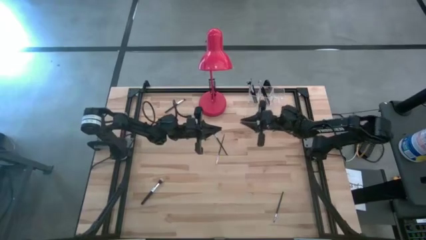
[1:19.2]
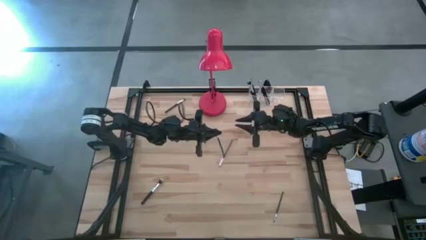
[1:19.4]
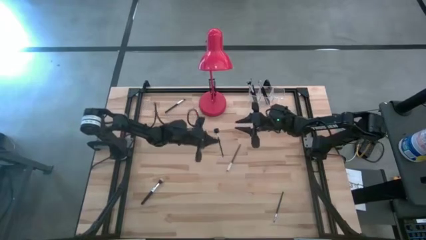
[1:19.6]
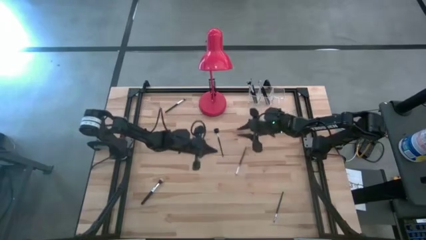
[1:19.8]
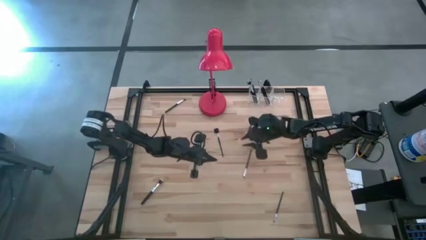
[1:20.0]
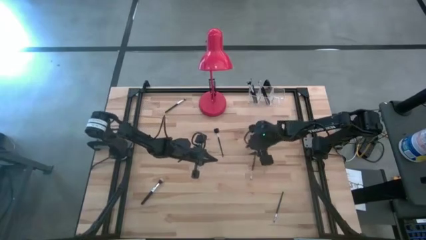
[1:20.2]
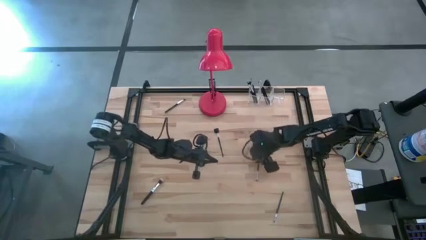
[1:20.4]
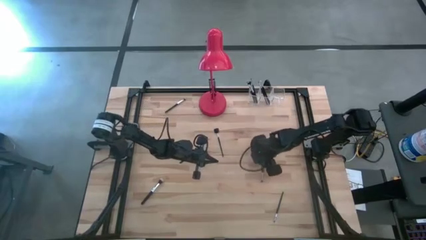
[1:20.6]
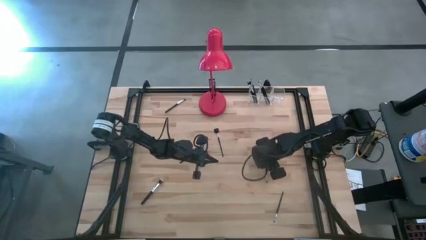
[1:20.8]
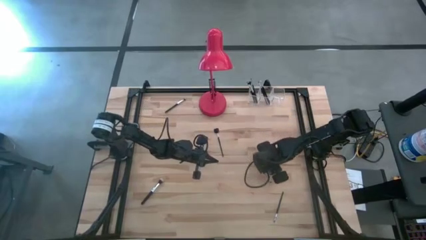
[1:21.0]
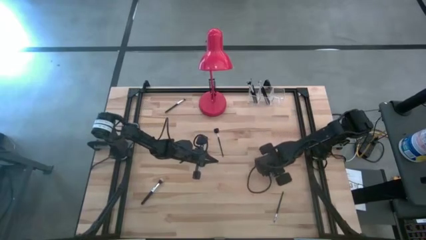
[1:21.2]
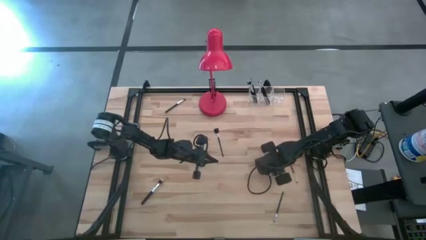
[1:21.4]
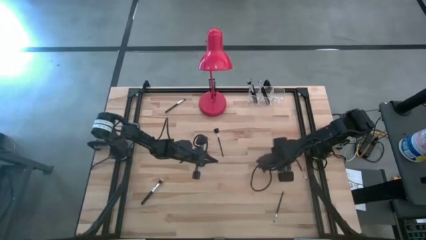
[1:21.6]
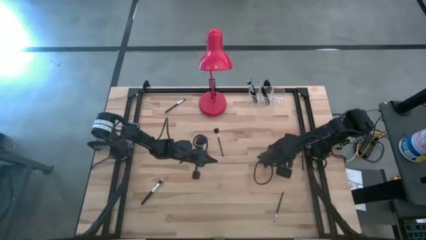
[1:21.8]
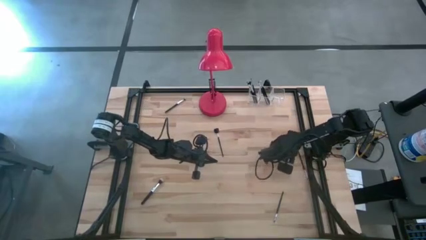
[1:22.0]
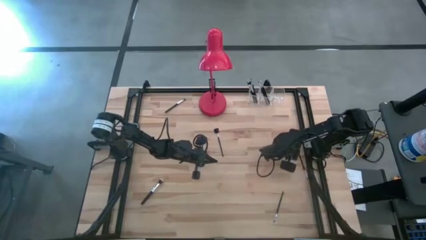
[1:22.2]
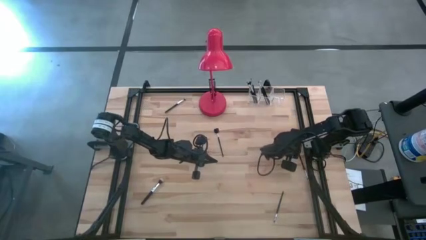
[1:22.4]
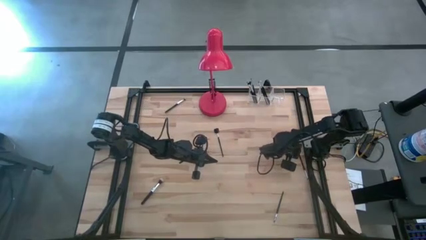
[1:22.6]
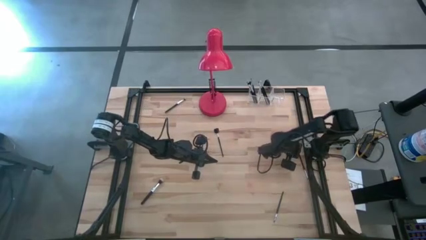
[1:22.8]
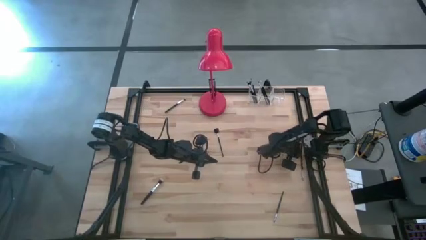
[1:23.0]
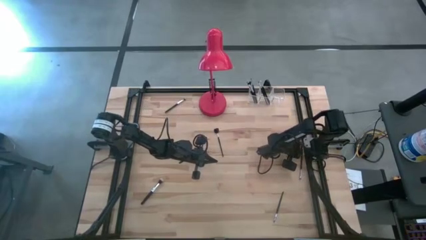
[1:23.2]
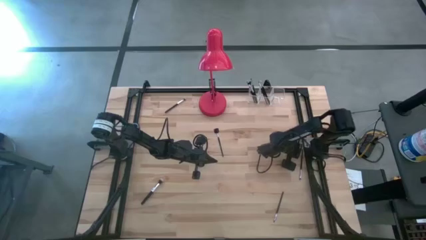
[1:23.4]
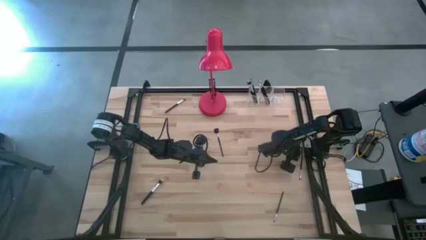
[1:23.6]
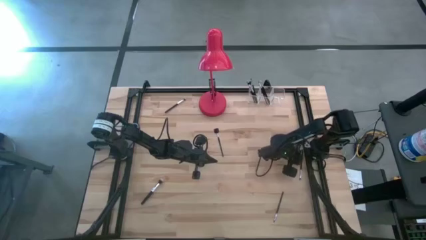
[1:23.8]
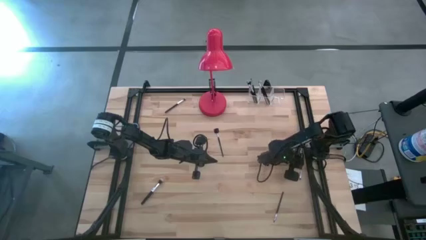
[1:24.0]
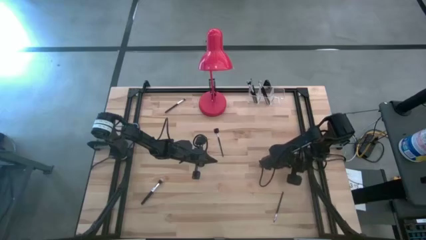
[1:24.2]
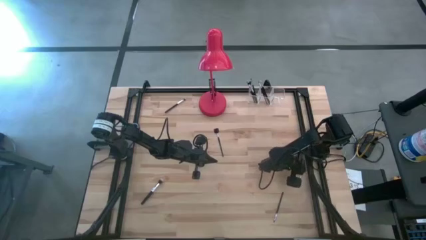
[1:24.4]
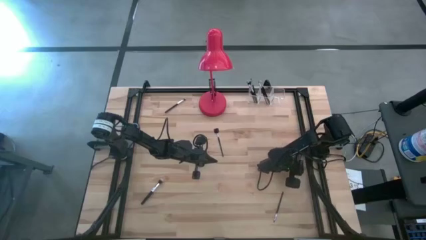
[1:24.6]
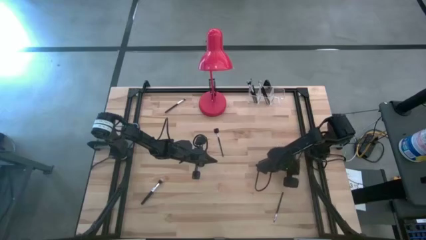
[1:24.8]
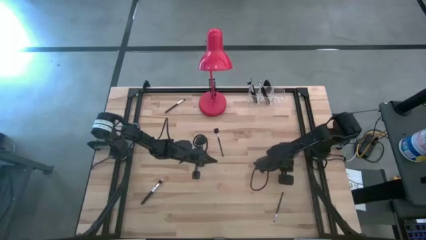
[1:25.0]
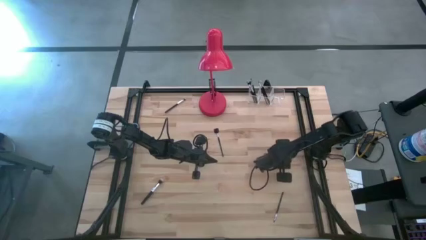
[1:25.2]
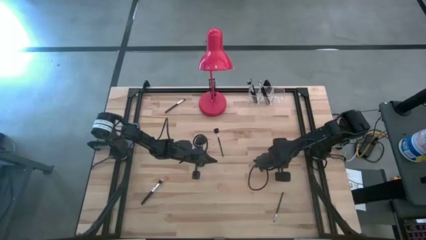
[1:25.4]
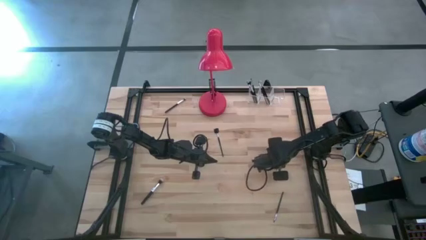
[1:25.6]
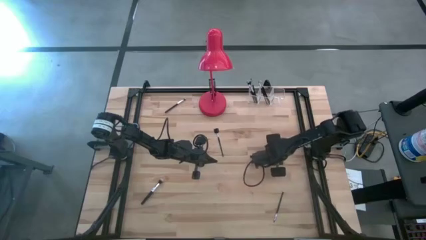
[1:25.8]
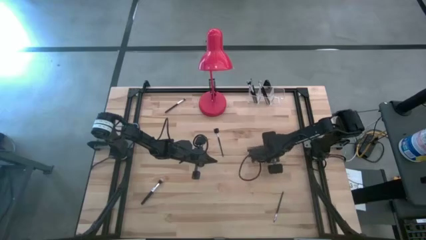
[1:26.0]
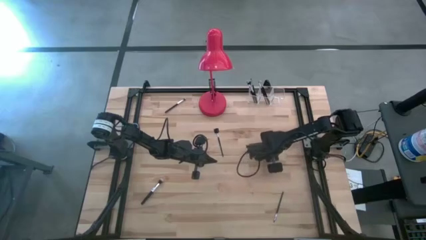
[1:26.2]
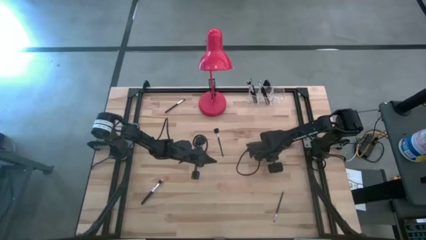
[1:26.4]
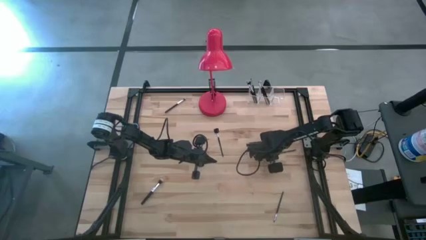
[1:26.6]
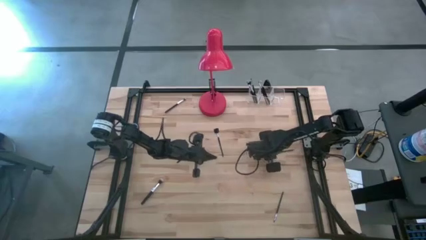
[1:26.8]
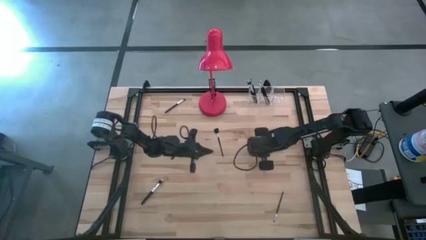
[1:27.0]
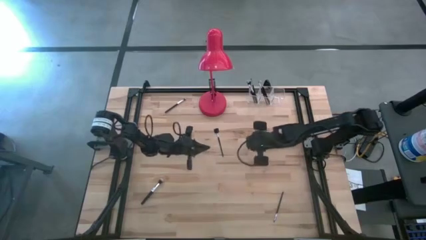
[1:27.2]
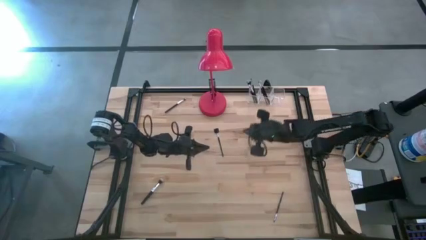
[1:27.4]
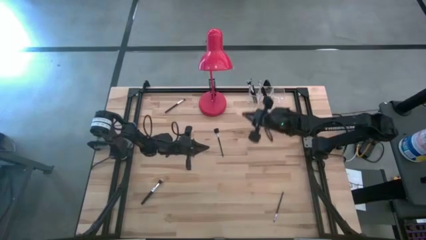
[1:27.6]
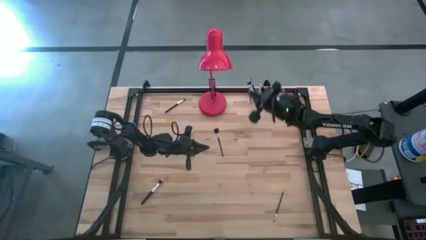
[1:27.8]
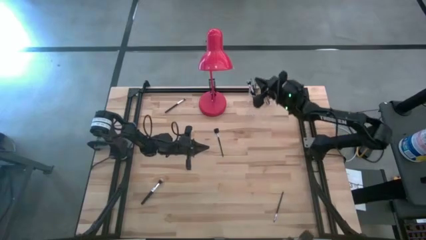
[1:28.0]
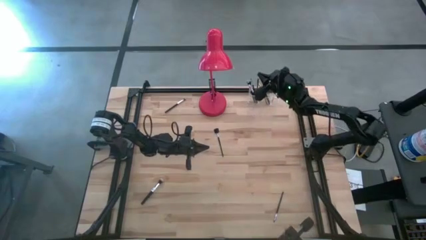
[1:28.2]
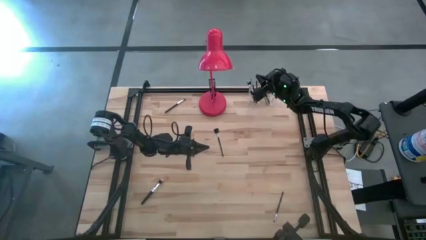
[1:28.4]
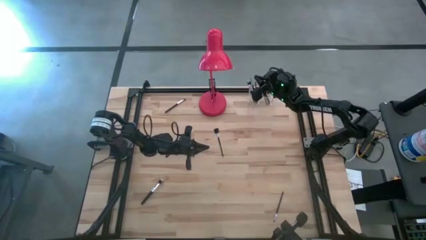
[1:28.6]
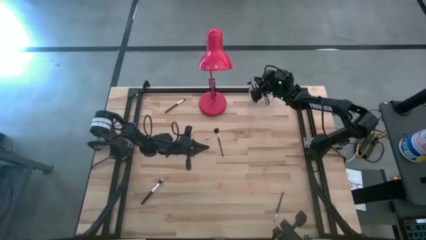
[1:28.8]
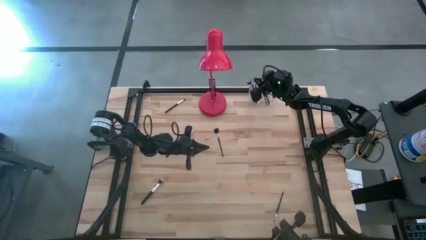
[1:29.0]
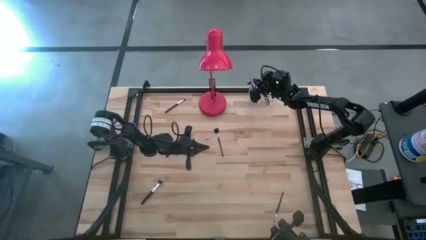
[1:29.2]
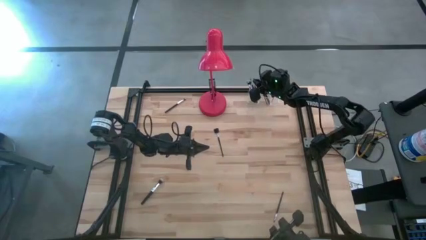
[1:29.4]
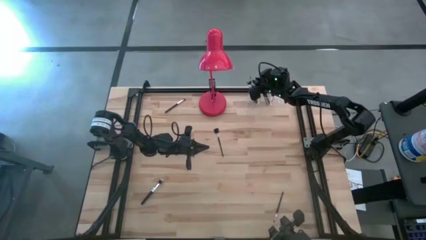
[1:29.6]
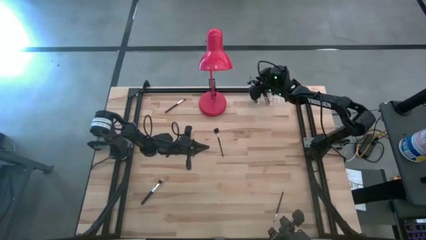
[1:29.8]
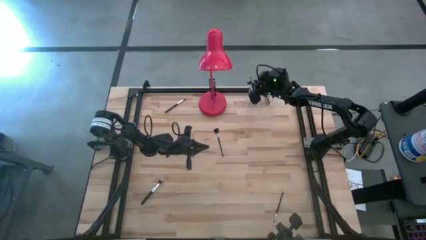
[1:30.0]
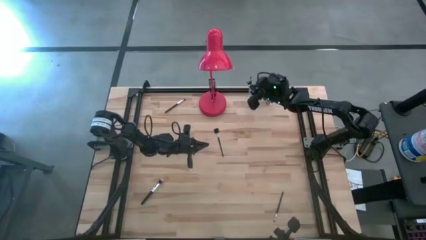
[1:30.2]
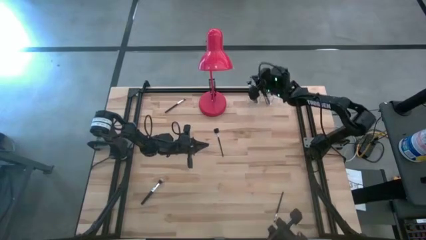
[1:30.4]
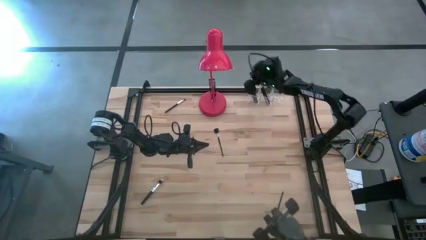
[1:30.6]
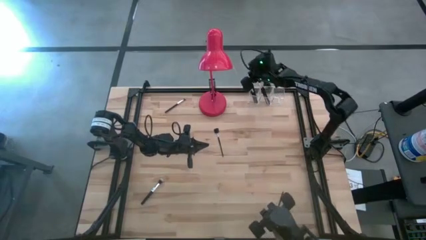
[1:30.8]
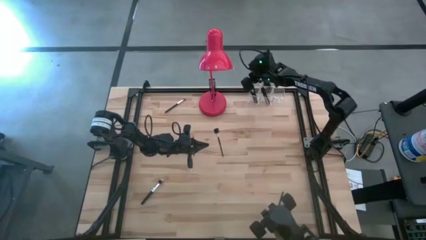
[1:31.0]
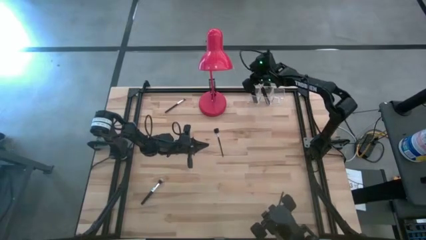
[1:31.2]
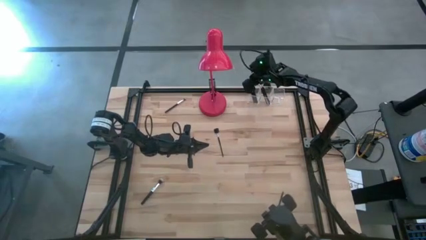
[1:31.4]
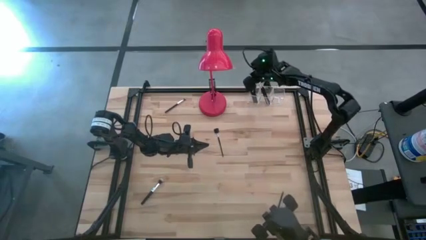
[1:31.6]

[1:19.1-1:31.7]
Task: Sort items
Put the black foundation brush into the transparent organizer
